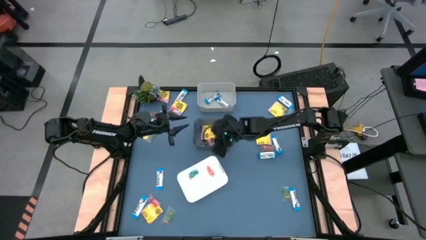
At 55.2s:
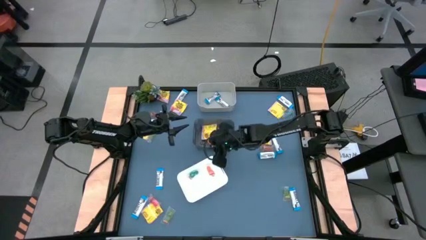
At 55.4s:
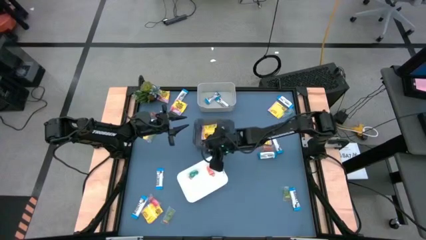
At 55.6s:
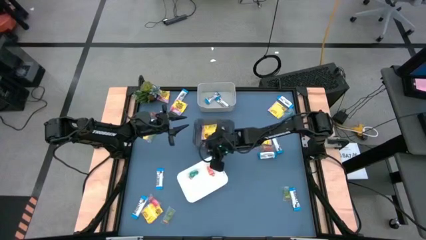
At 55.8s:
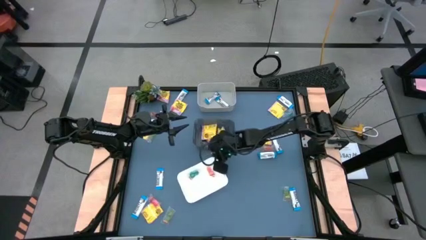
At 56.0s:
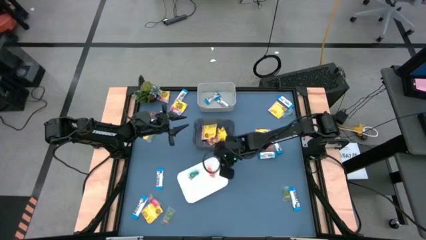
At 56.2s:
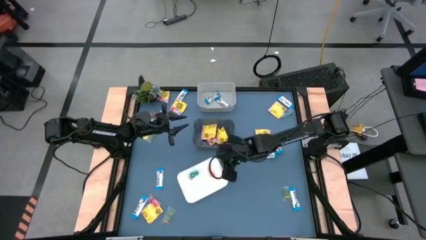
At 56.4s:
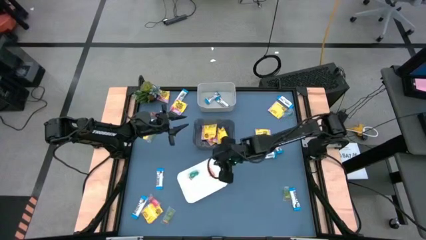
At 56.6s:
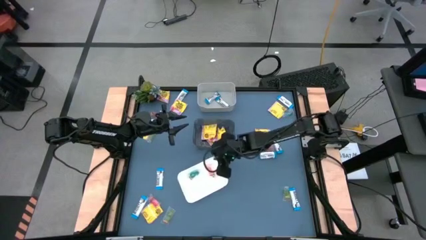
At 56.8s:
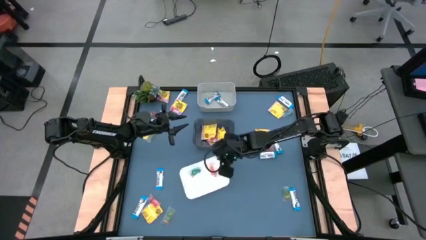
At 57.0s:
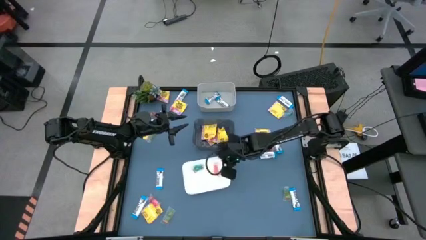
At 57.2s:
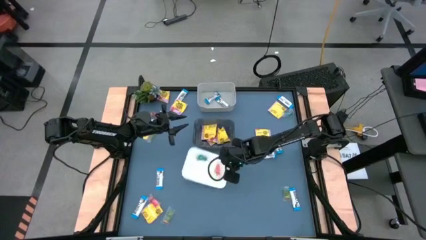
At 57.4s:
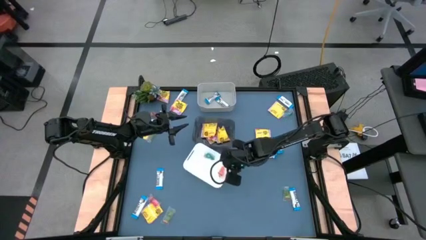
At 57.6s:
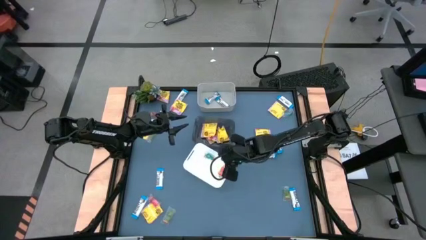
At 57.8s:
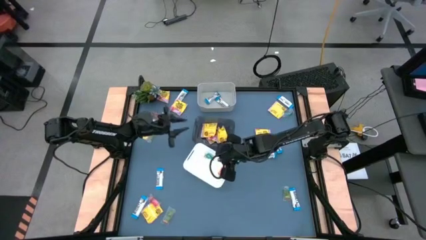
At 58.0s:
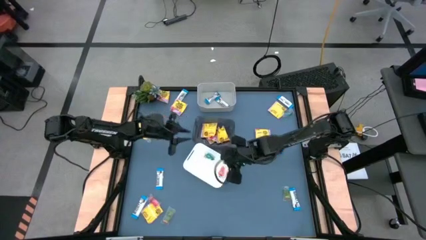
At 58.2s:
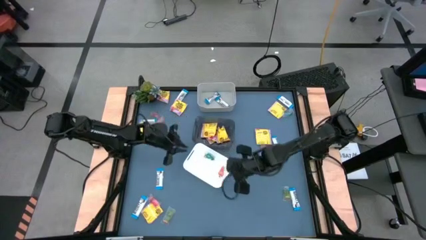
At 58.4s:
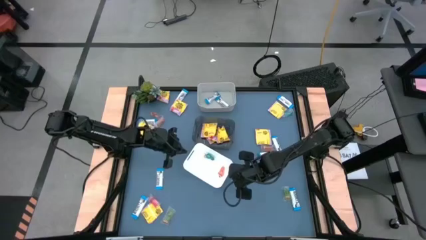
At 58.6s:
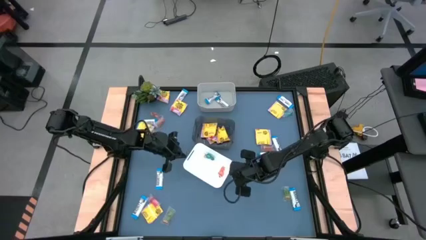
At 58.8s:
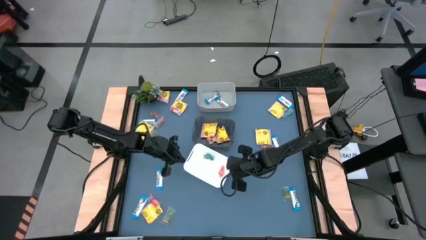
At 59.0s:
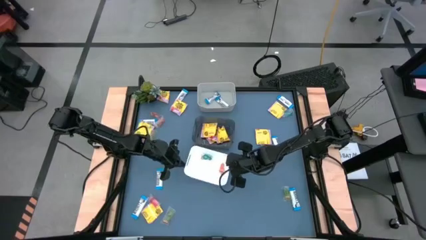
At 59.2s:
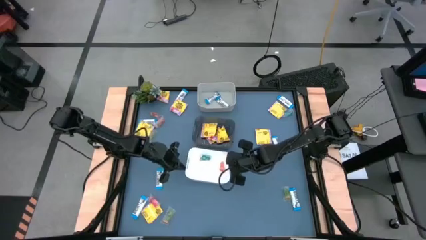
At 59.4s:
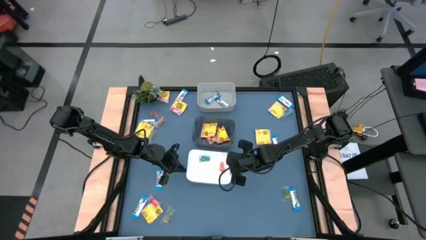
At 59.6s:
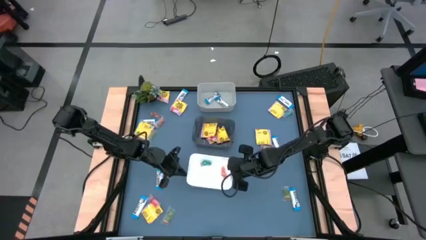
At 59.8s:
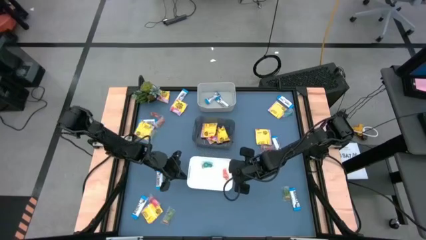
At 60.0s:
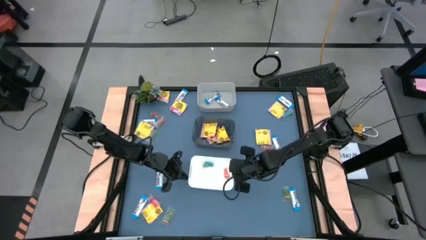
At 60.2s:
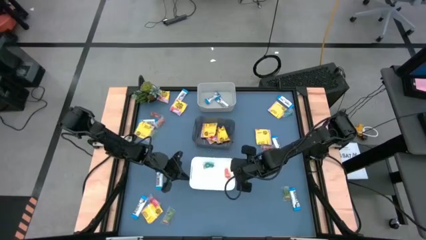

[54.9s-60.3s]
Task: Sort candy
Adjust the white bin

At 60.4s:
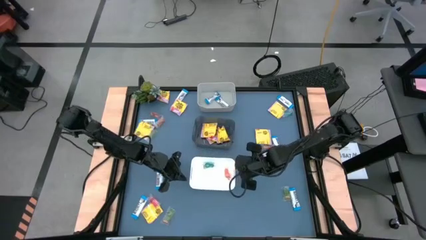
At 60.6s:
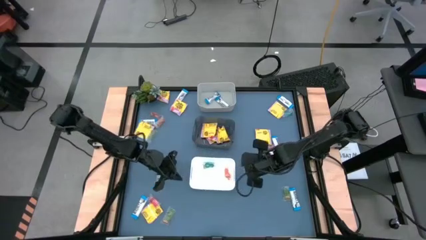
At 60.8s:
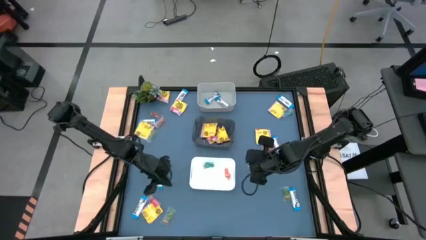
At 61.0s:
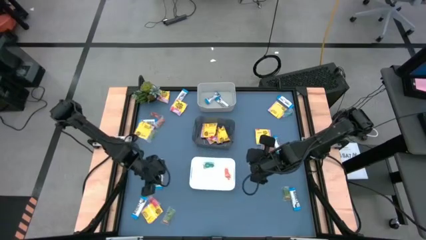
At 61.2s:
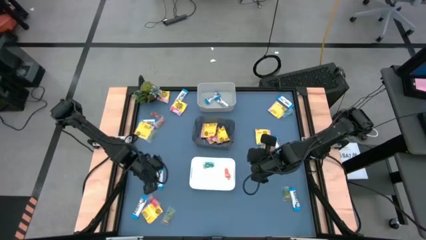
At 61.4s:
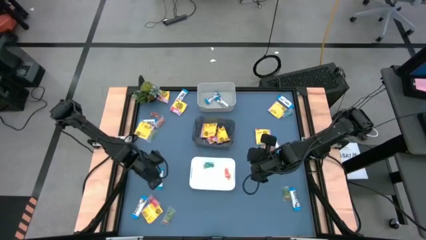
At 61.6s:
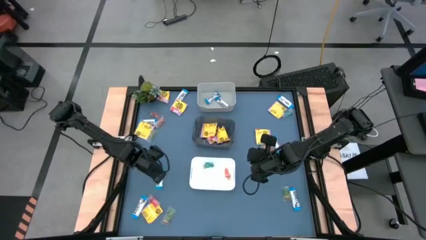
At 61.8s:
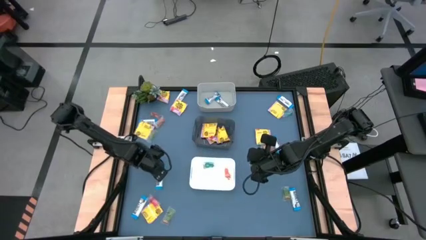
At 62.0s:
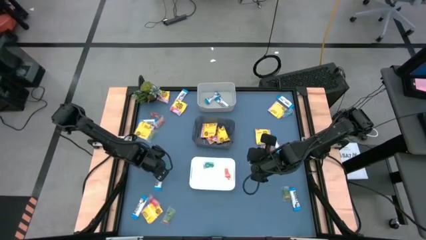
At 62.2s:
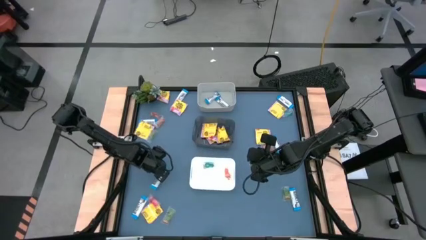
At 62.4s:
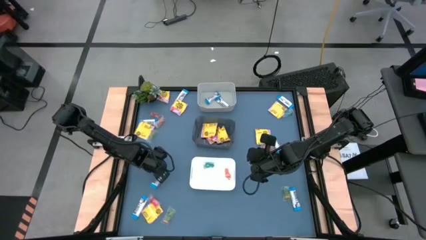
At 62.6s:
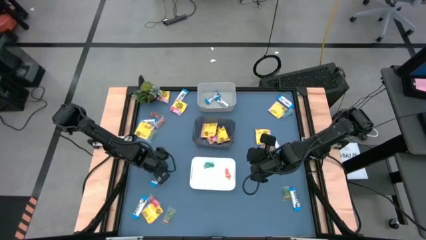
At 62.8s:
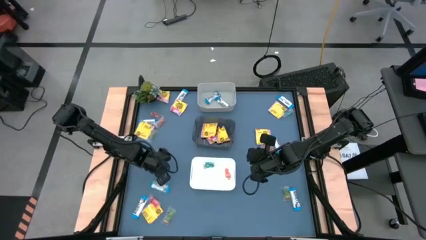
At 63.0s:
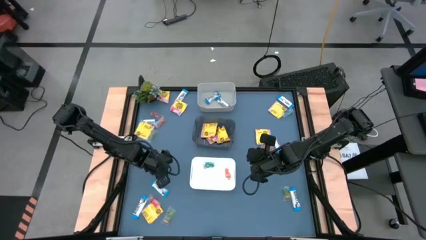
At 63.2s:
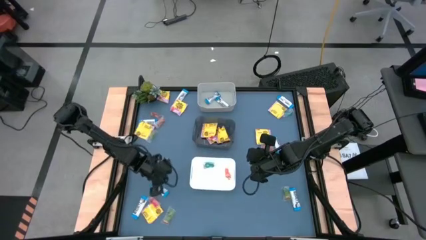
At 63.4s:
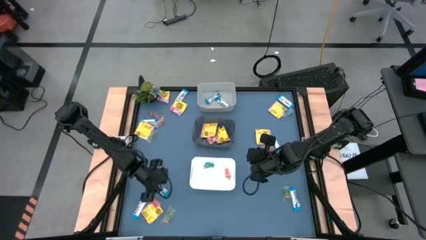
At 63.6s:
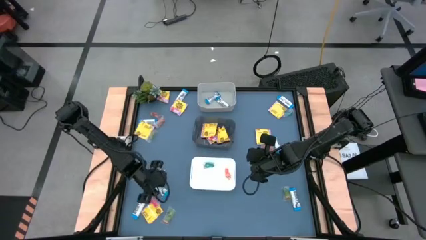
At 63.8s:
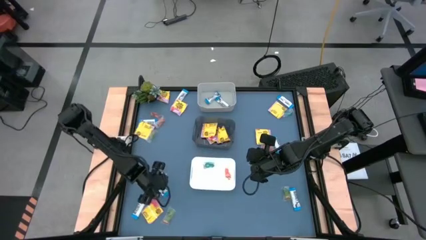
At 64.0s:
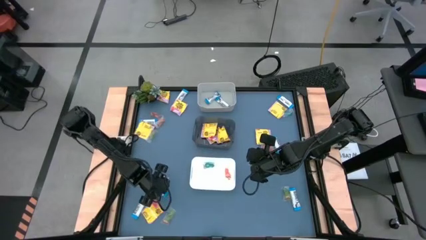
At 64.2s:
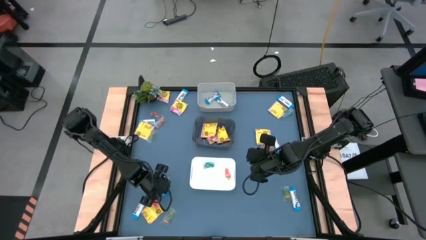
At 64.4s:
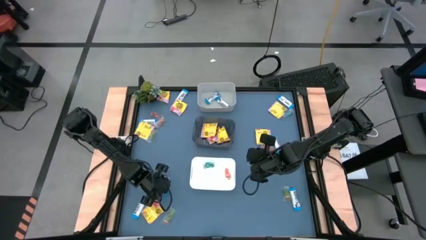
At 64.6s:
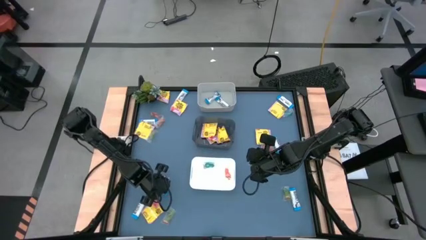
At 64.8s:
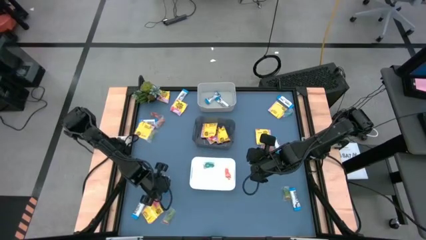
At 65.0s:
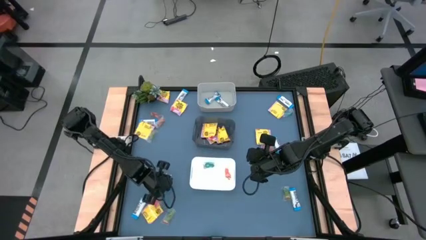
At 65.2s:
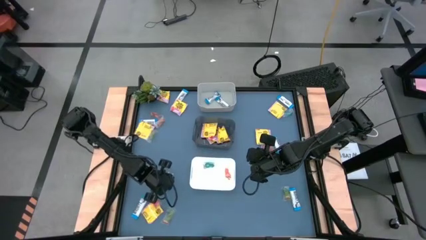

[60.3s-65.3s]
Put the white chocolate bar into the gray bin

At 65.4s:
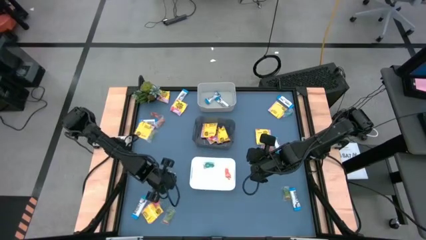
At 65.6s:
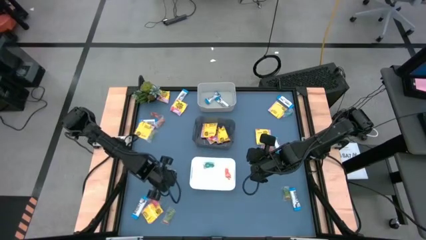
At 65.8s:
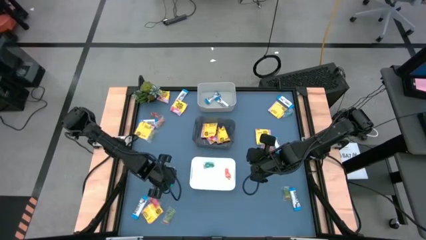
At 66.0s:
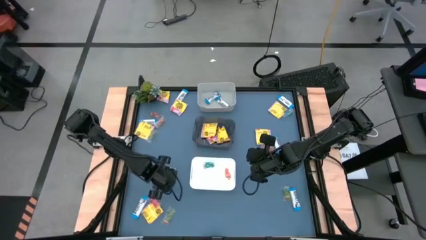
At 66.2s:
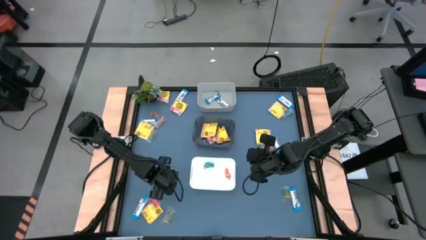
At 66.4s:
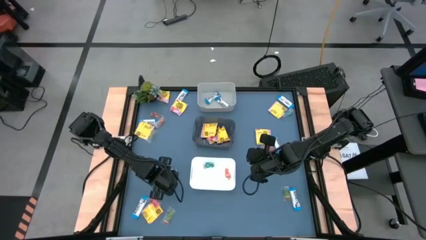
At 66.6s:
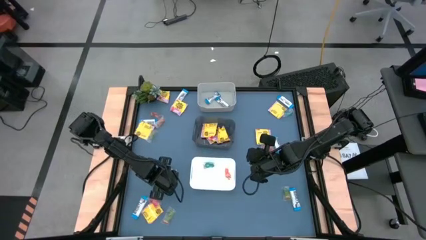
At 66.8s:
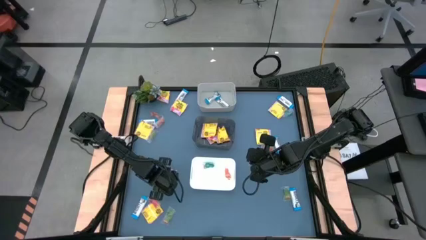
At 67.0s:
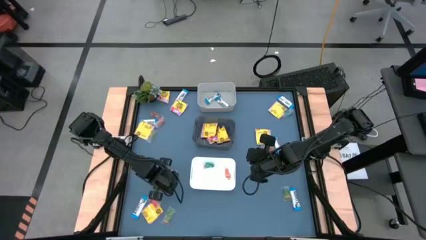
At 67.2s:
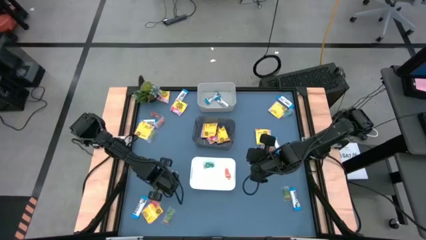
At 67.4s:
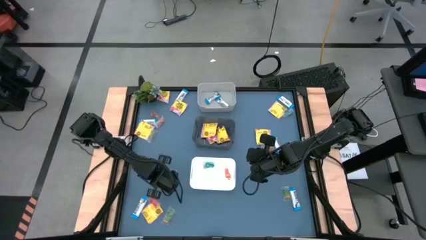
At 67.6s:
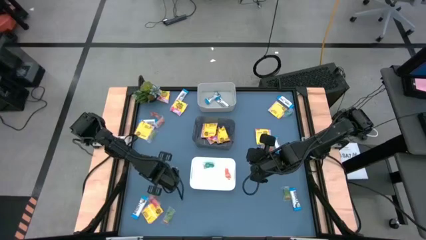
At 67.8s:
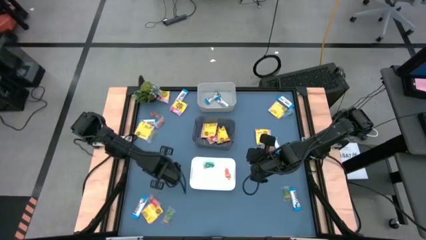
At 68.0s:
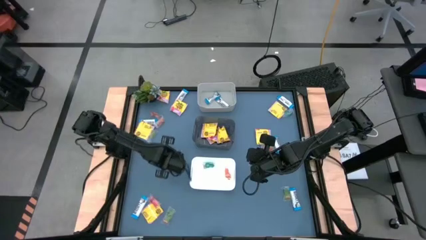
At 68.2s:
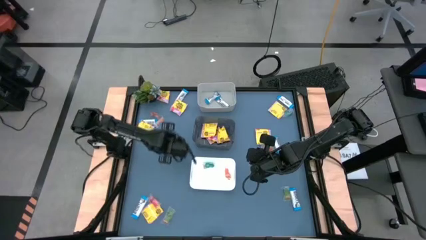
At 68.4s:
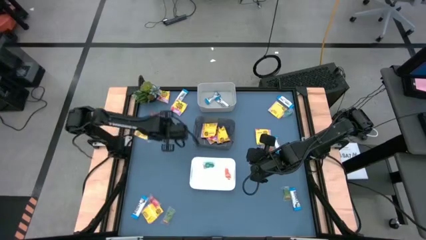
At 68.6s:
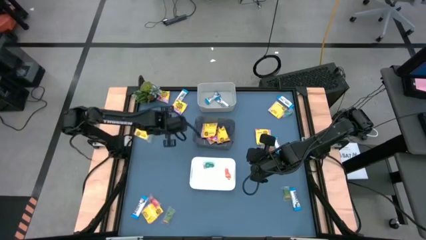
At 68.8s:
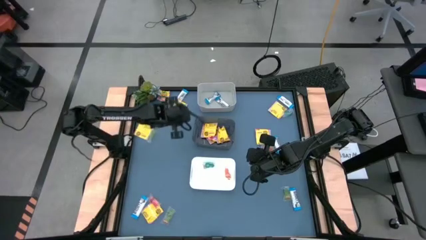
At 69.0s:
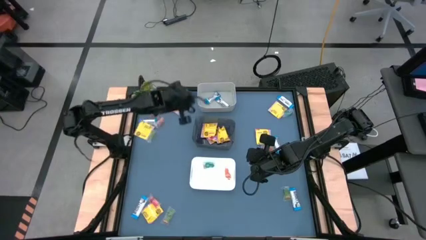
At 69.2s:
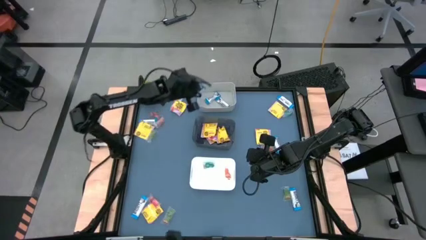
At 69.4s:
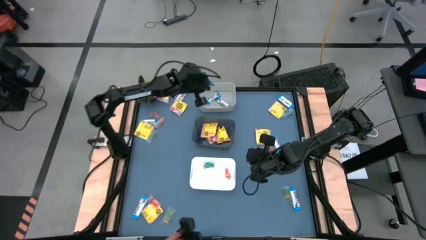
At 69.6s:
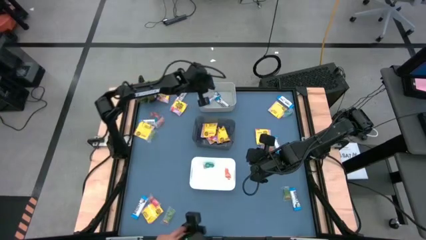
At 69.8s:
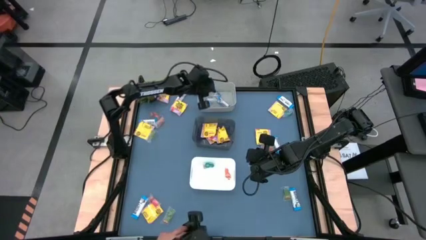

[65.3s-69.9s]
Put the white chocolate bar into the gray bin
